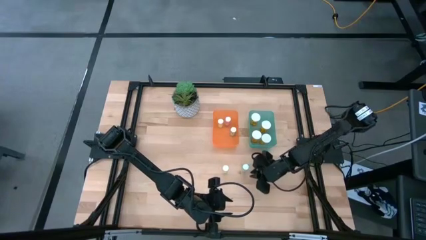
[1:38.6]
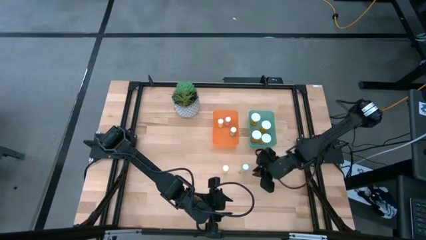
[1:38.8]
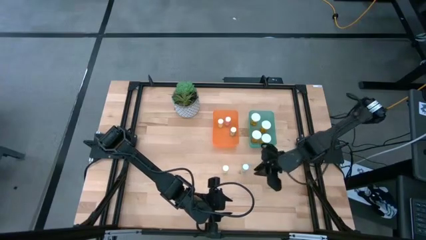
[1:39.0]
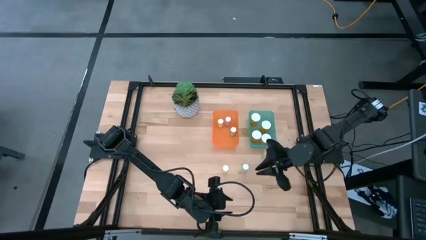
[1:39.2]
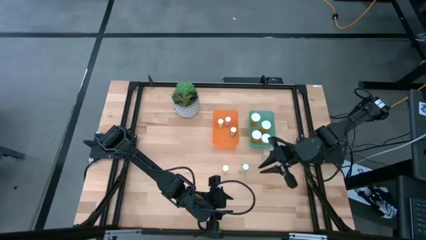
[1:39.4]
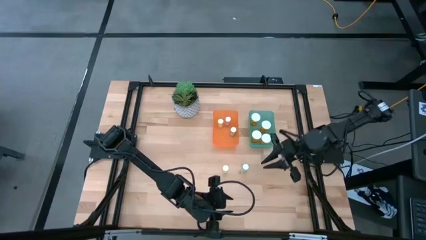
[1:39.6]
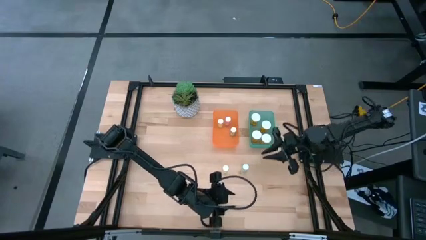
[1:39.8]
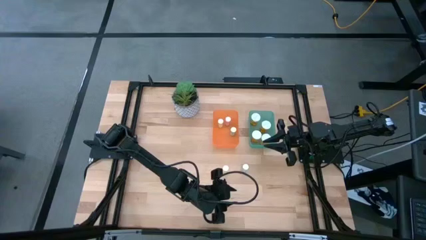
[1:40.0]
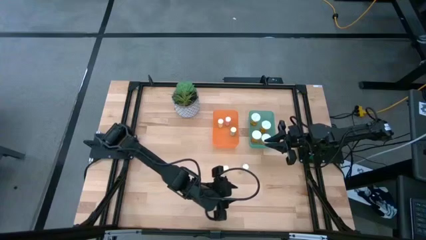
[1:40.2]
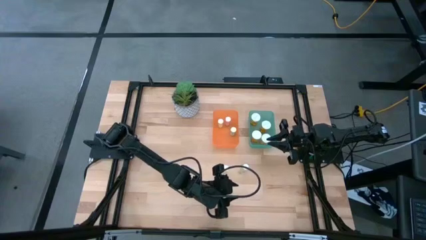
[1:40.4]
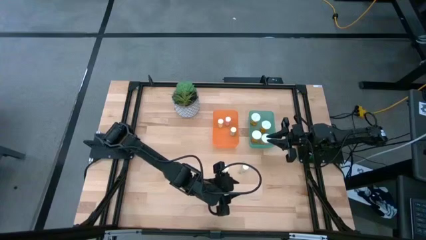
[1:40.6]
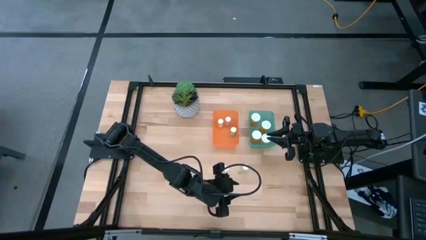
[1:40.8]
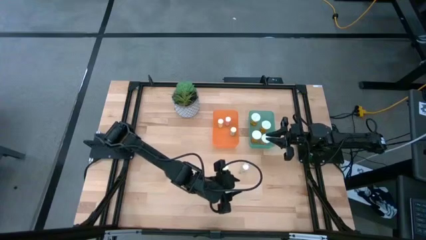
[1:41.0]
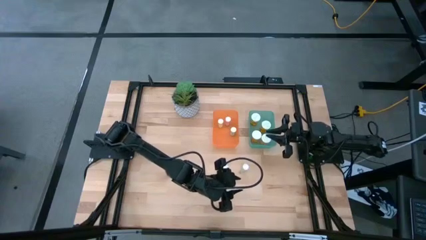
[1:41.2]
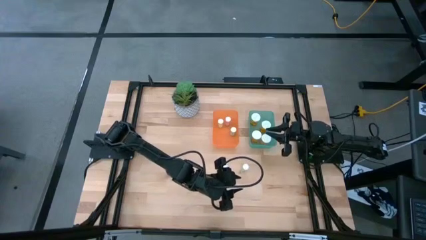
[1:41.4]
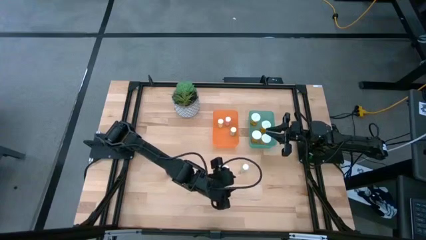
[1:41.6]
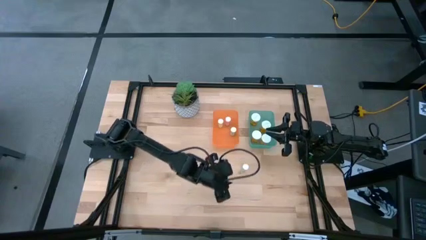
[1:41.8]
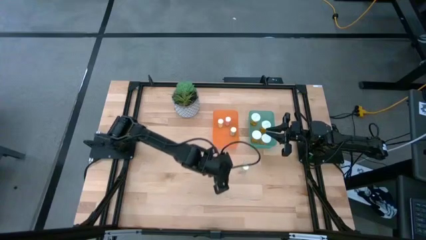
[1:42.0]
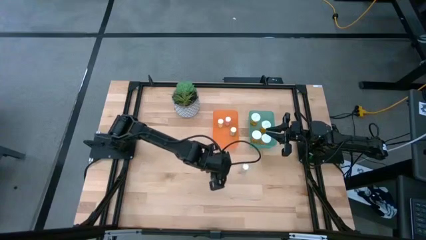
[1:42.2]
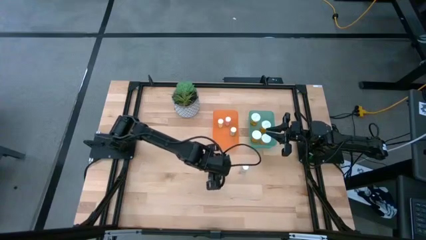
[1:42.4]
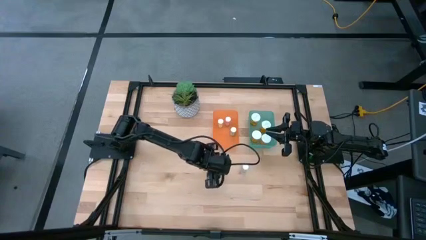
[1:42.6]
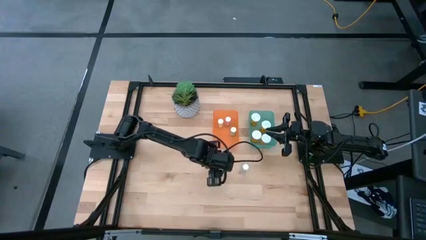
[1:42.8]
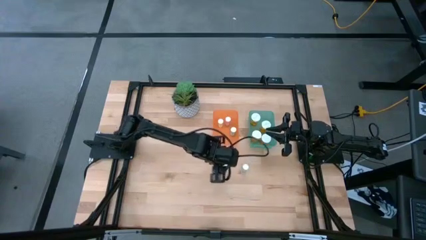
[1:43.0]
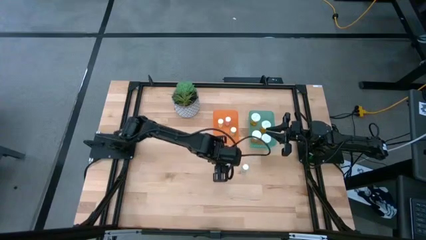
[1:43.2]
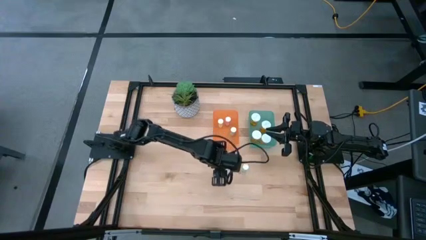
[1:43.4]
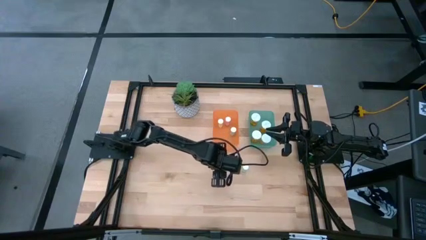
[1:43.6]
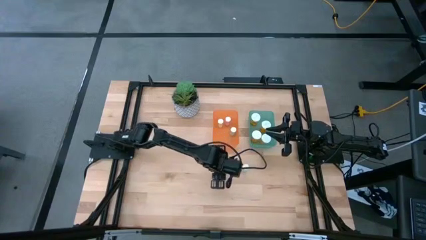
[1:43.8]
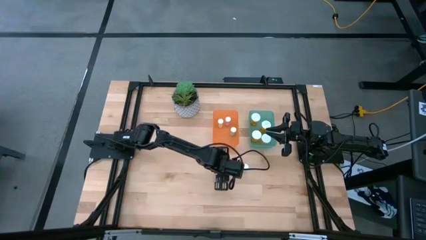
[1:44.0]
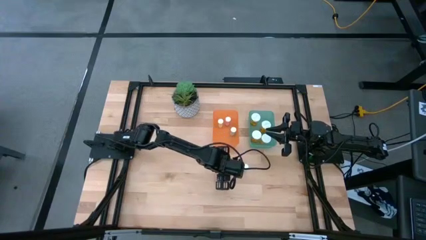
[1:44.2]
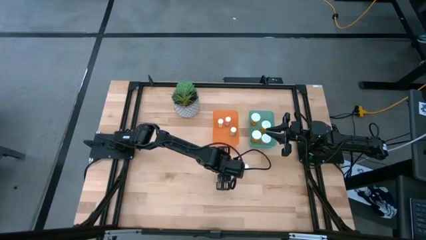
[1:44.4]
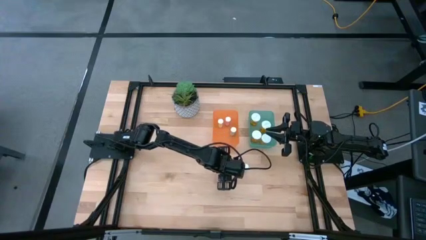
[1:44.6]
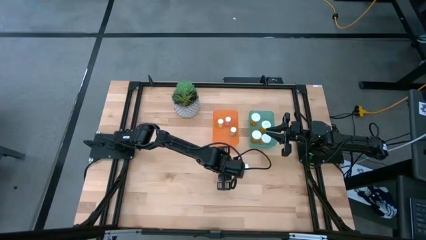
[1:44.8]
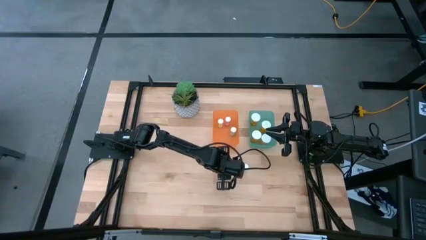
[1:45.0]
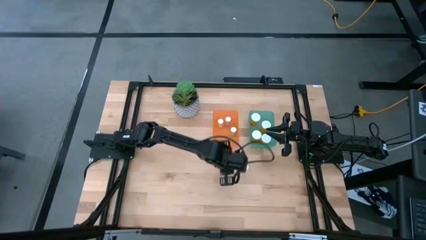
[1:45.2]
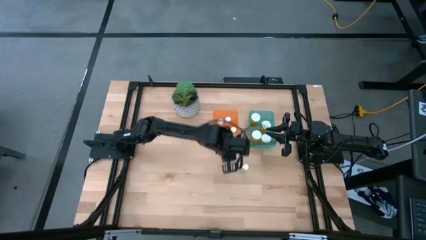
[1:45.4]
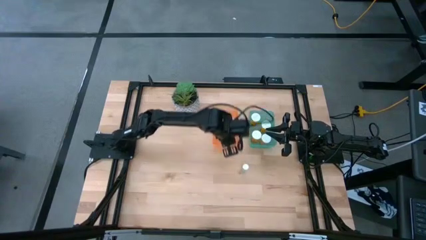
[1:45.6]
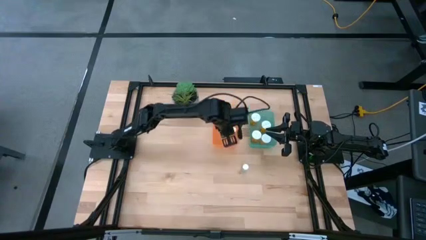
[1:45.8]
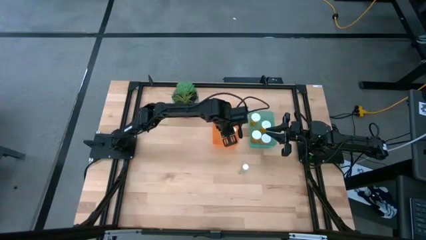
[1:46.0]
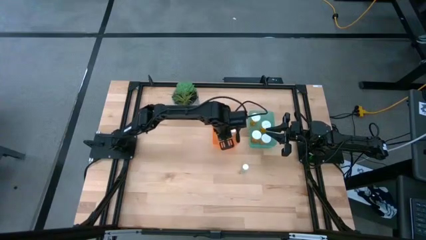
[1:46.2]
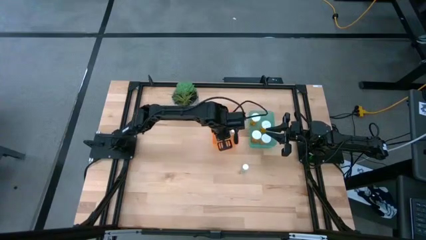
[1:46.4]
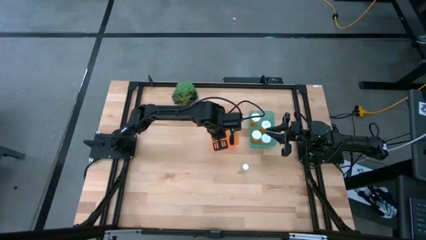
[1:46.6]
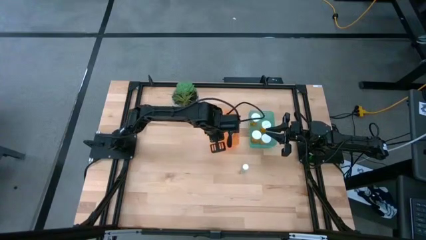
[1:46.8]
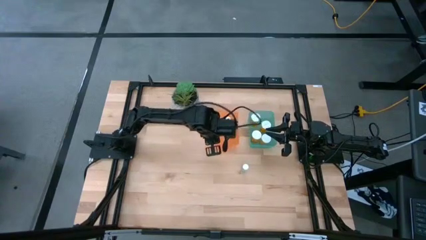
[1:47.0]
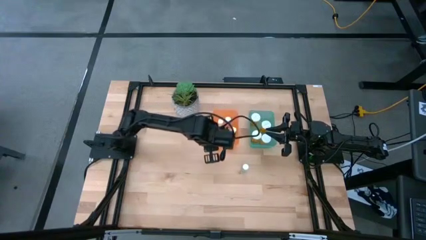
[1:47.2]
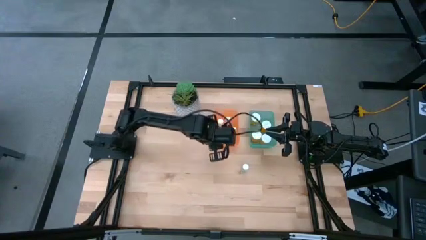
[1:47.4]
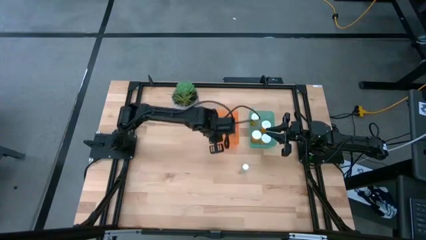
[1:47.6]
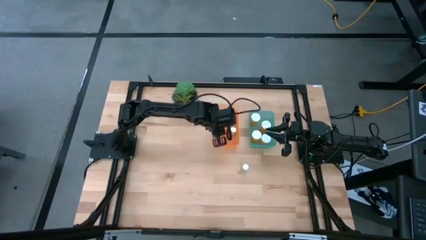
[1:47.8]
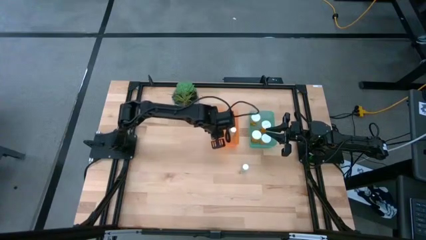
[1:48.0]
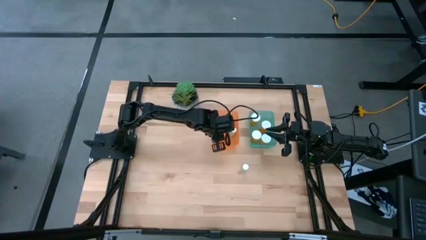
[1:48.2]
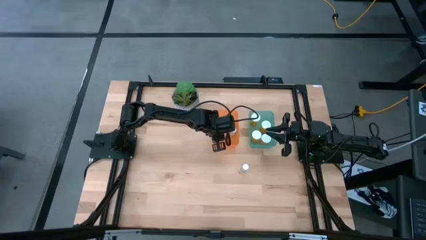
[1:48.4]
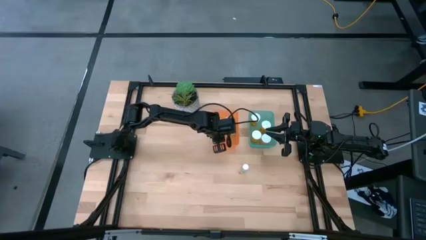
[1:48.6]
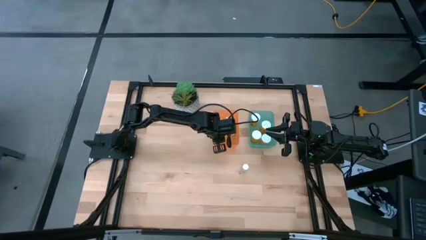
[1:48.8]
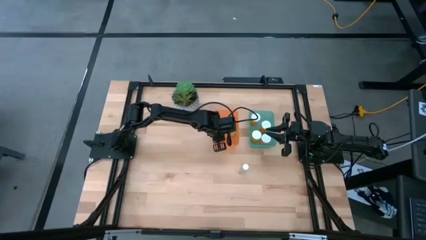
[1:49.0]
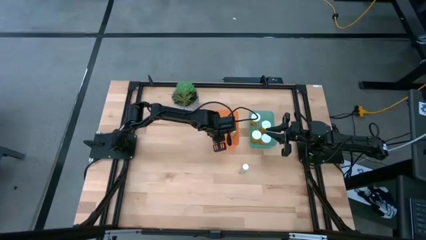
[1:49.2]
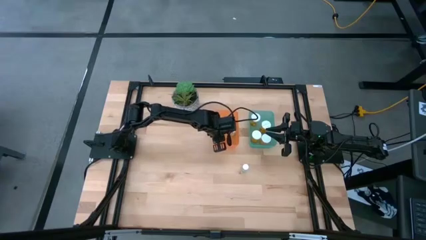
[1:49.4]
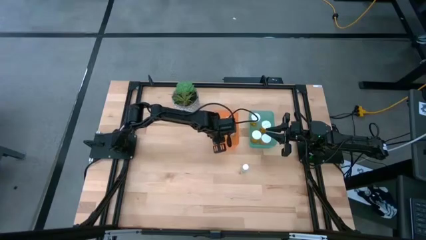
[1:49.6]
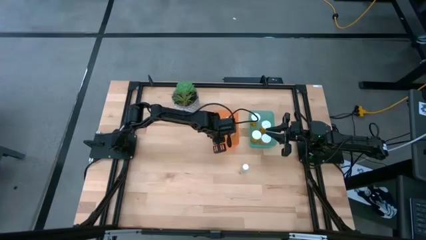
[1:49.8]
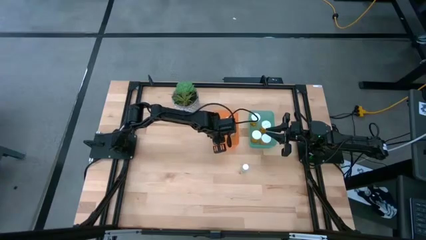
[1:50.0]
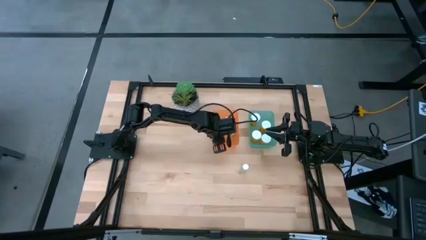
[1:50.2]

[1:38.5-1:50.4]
Task: Pick and place medicine bottles into bin by pill shape (circle, oval)
Put the small yellow bottle into the orange bin
